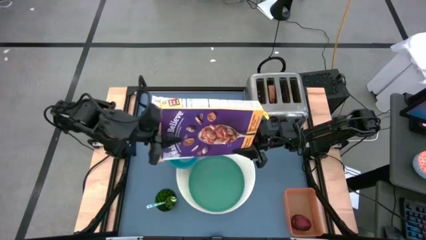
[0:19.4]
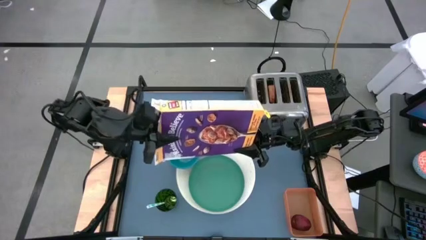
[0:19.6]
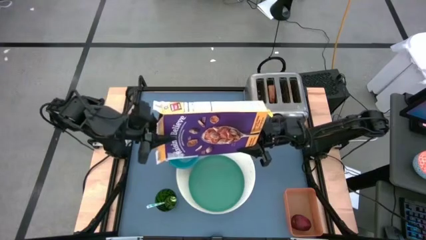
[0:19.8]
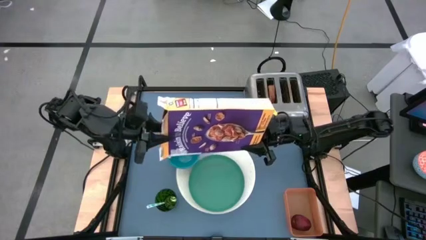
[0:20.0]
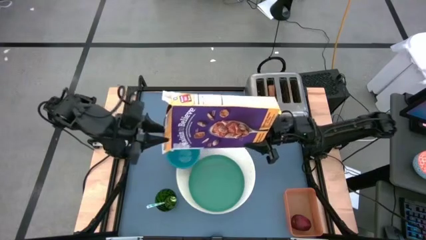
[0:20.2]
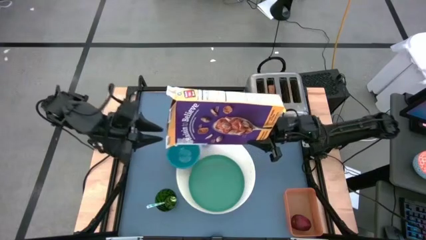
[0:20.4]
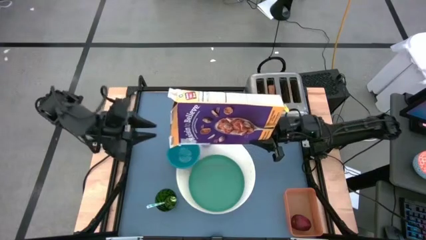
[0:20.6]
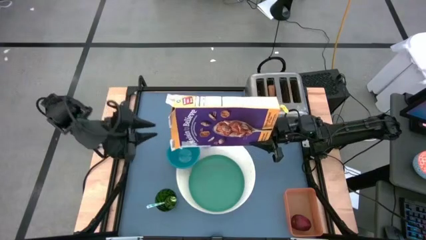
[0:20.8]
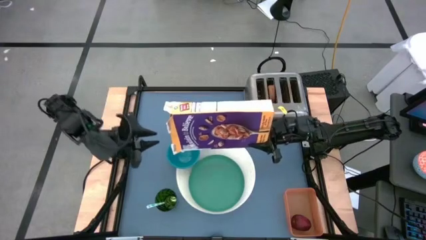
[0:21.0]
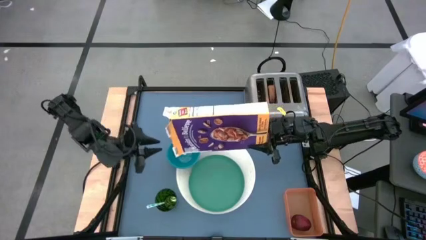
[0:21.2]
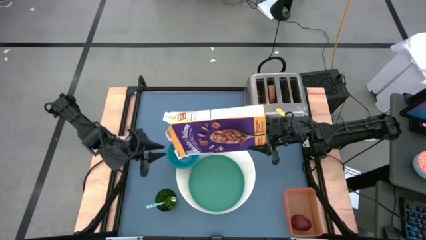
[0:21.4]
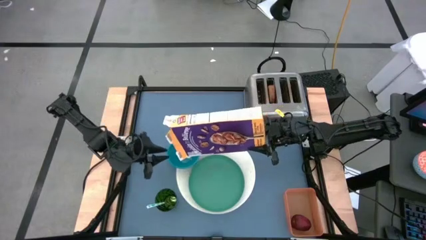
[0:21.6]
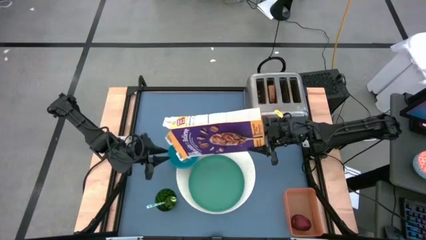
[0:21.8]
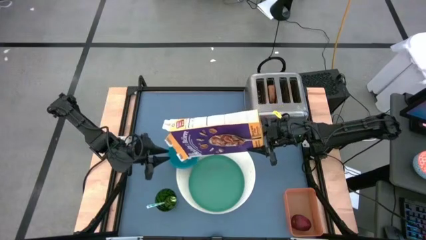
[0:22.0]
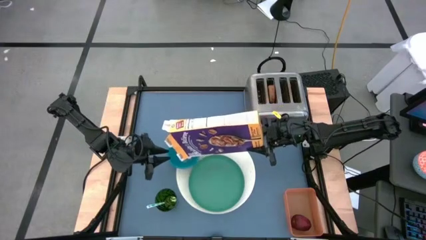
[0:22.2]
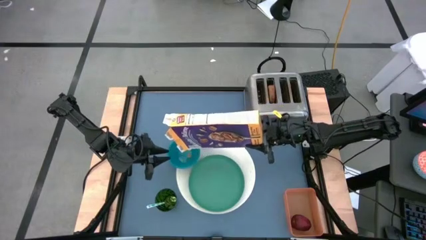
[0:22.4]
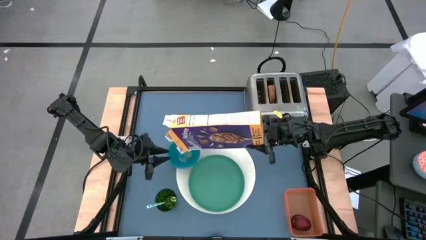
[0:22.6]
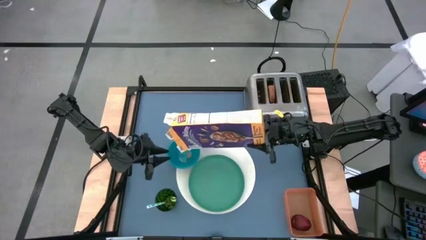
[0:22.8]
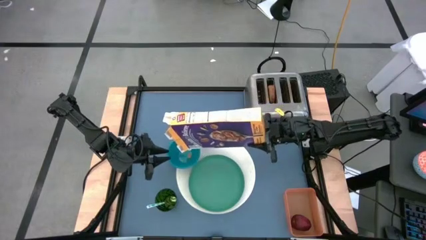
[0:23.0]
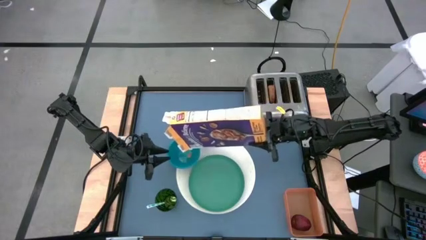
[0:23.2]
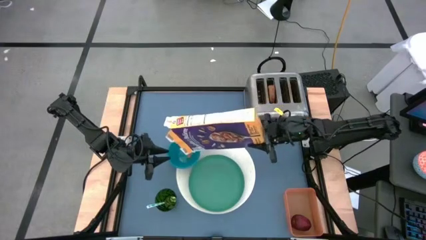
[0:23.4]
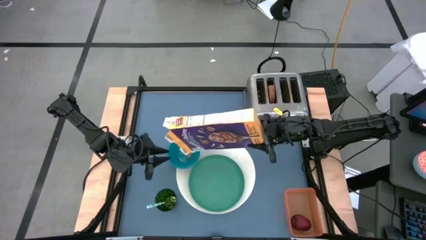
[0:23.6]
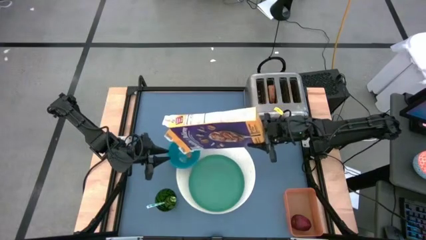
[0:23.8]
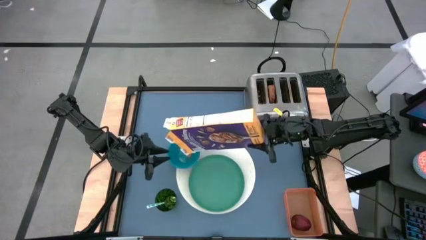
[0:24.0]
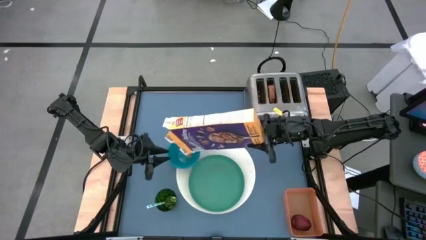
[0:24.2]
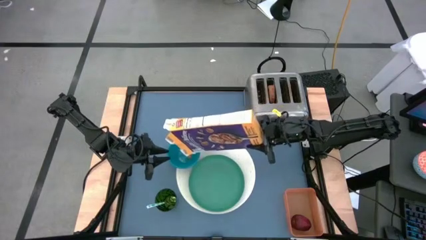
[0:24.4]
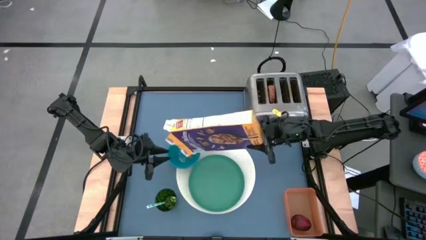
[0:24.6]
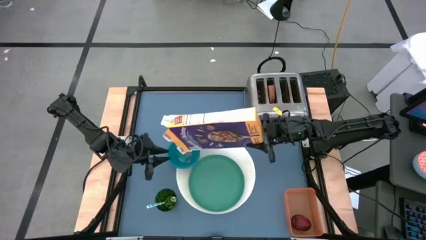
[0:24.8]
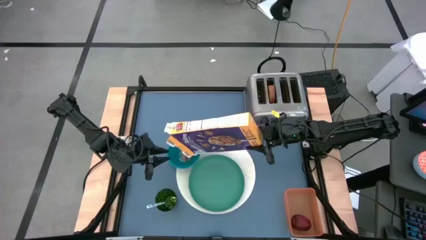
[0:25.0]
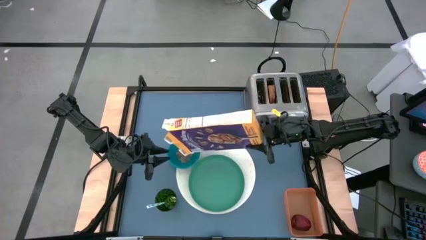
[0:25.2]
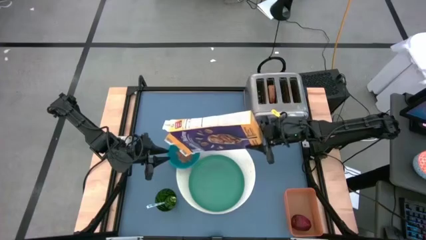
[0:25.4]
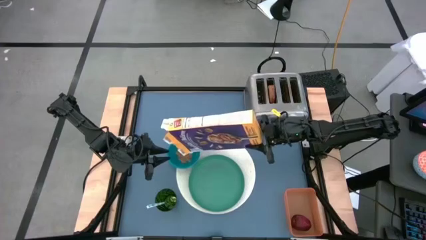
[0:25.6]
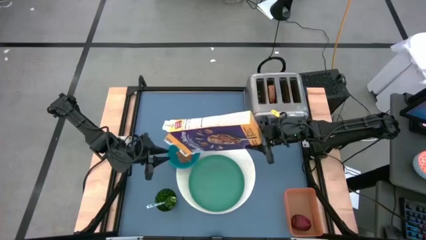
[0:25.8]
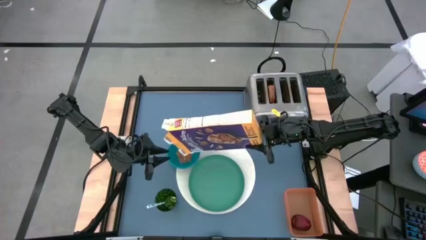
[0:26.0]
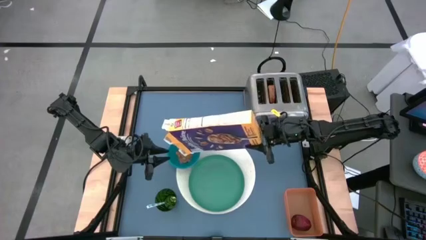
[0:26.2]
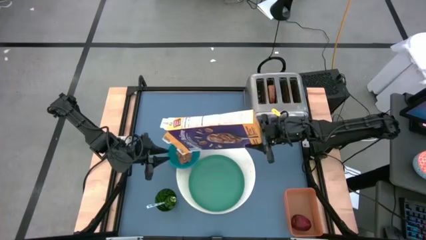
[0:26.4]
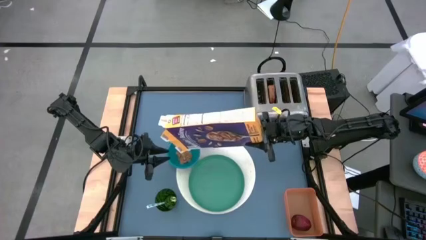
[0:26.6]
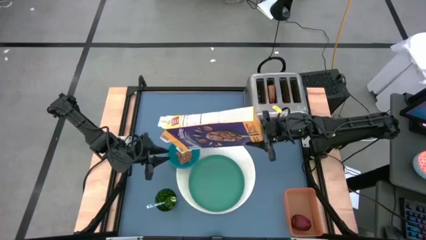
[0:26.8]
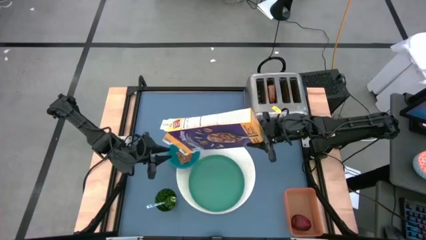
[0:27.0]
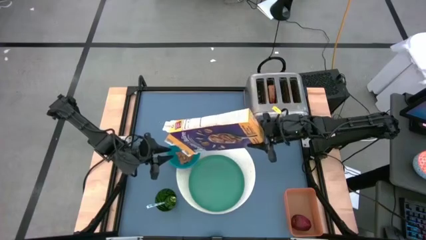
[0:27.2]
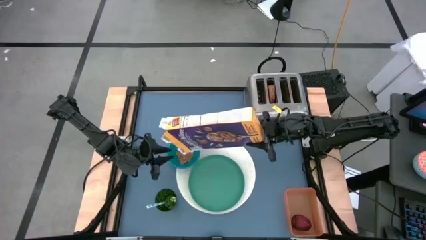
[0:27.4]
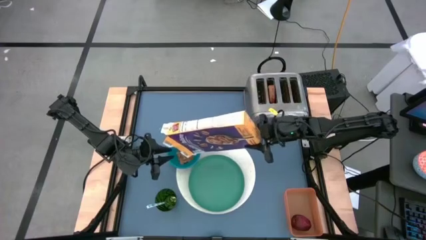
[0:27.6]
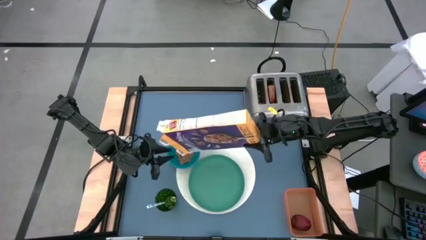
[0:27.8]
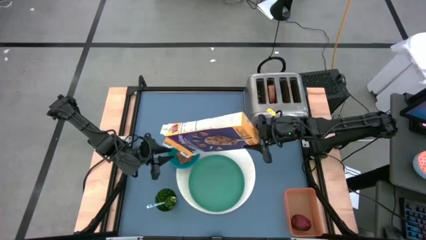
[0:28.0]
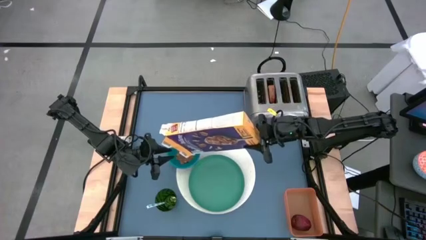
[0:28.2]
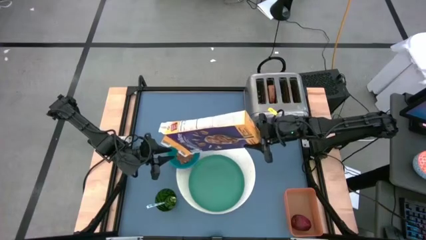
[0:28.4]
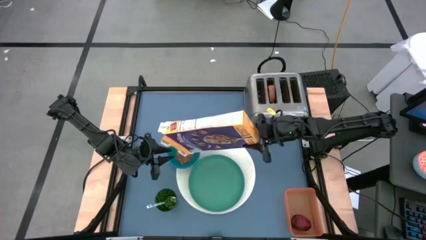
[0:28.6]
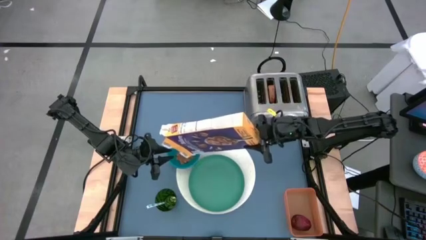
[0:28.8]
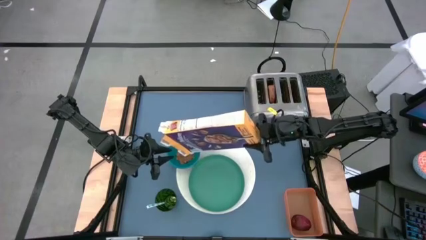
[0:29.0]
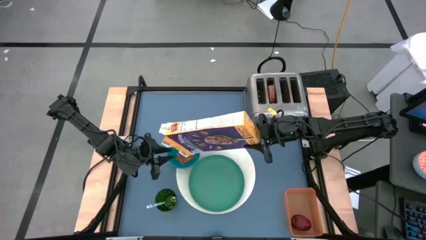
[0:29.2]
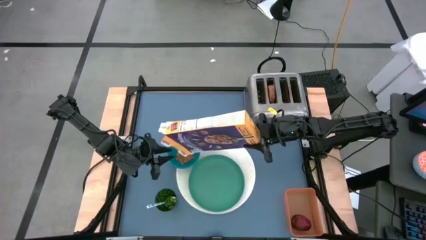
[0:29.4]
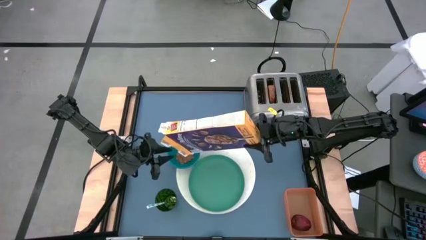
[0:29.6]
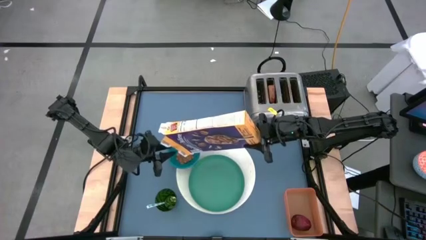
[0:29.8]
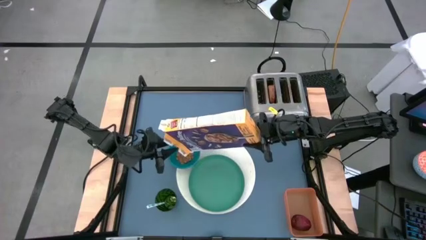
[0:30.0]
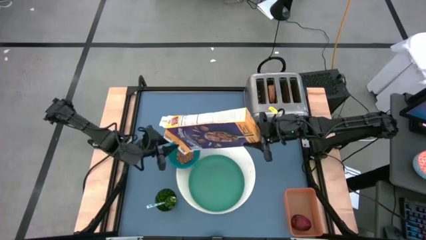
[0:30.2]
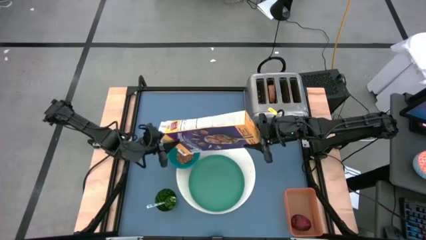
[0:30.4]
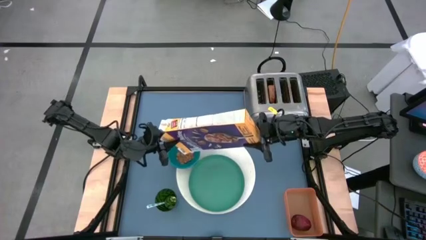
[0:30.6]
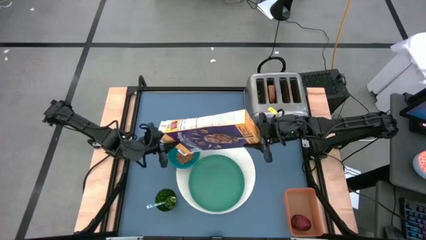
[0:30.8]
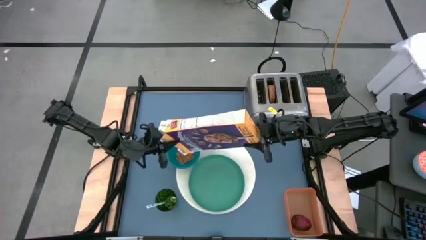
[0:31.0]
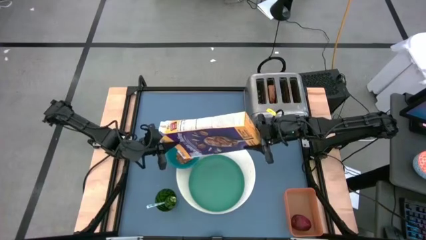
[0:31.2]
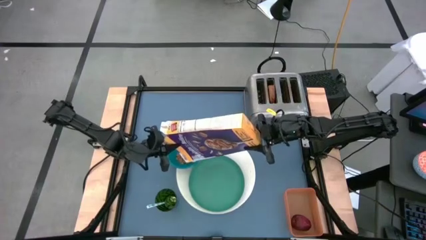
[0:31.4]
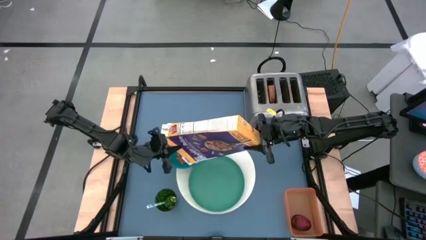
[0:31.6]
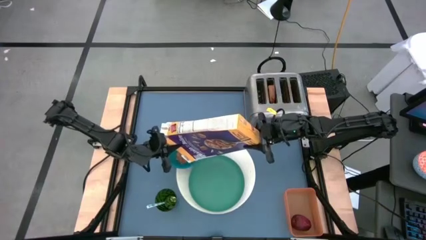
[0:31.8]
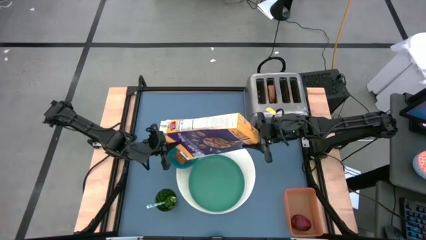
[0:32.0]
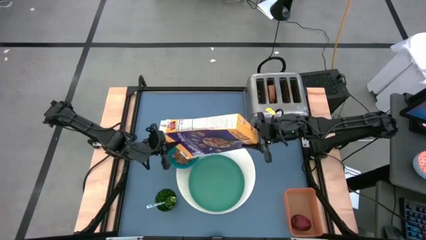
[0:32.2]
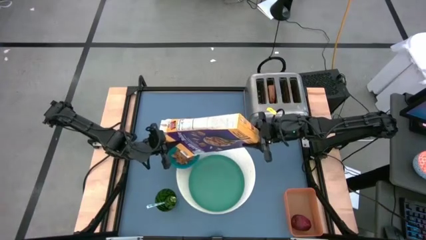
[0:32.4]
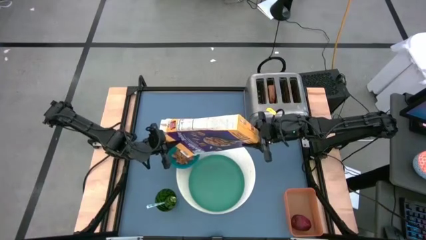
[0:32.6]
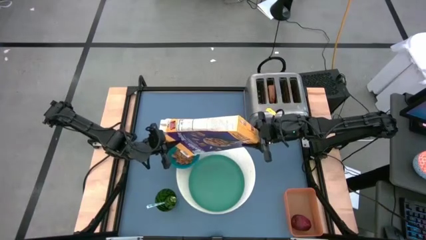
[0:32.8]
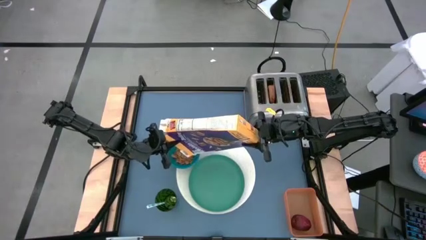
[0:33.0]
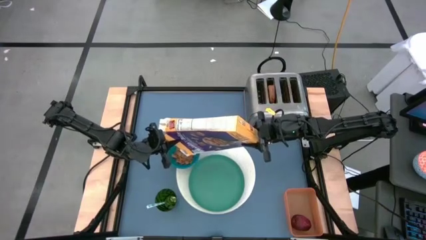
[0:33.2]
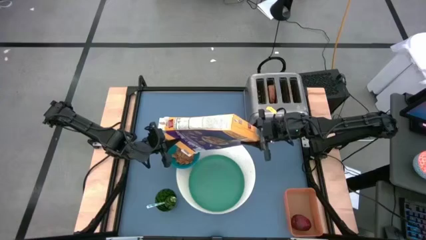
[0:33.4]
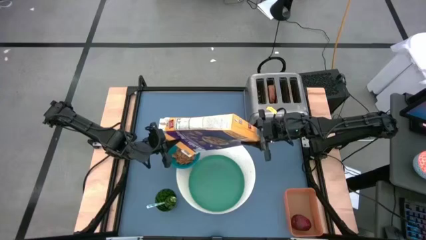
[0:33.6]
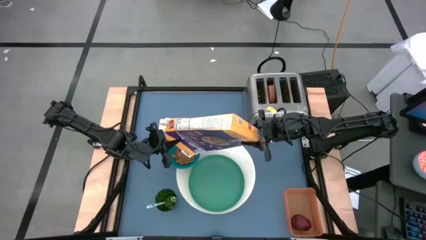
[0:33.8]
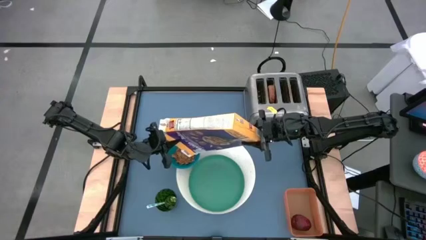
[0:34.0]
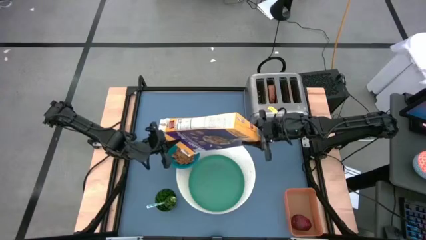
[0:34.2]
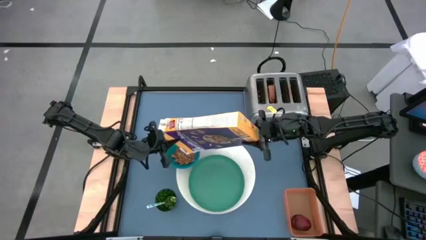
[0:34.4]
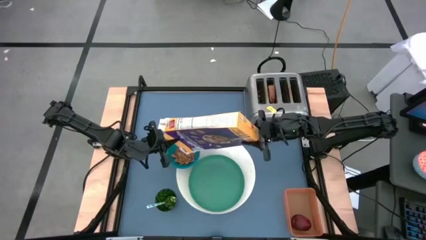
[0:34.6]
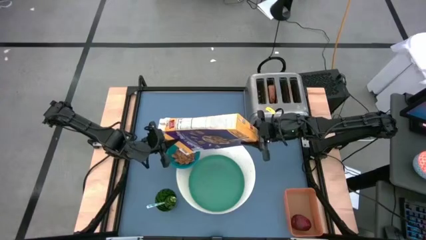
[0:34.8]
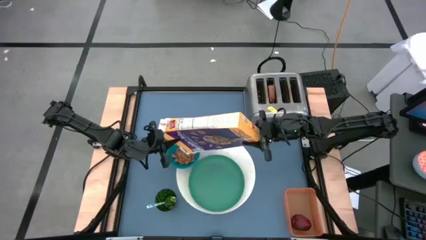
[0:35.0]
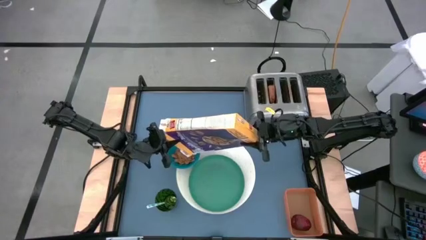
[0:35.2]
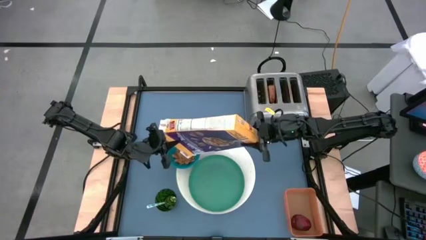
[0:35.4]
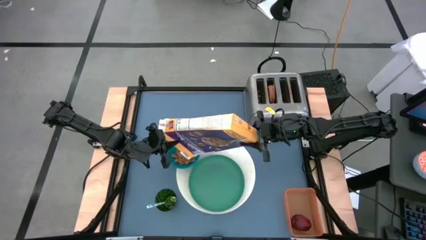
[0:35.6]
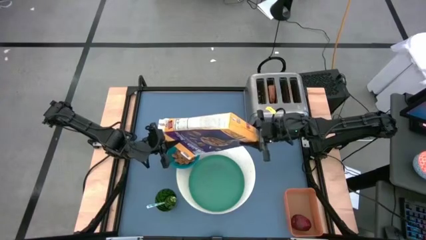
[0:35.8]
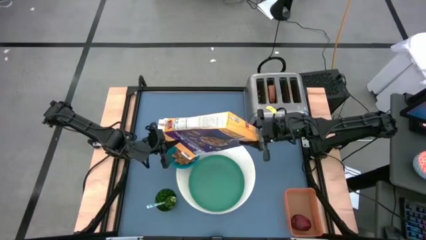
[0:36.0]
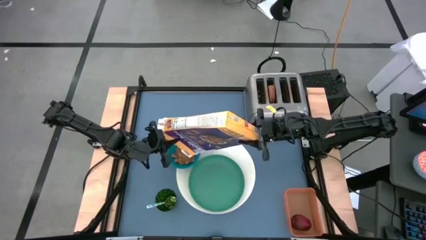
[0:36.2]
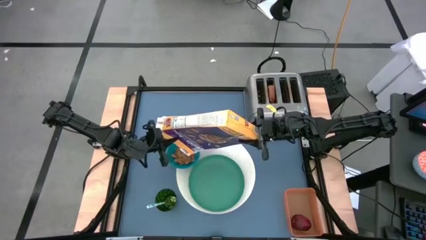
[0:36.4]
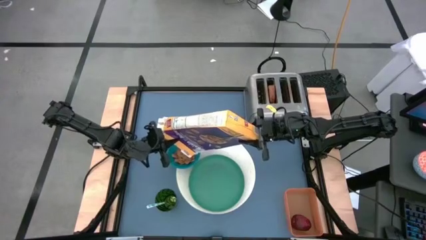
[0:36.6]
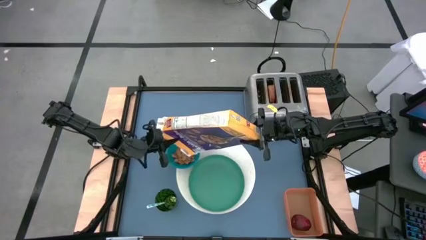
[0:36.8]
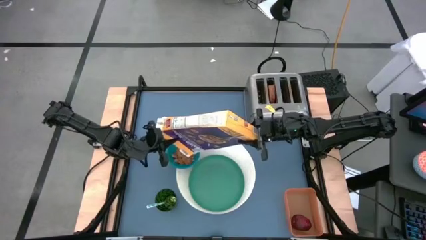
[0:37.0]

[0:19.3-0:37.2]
Task: Arrange a breakfast setting
Pour the cereal into the blue bowl
